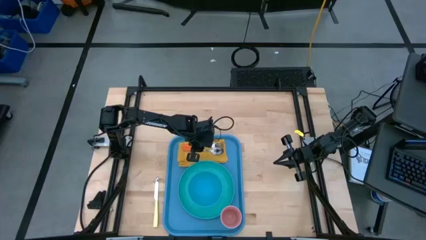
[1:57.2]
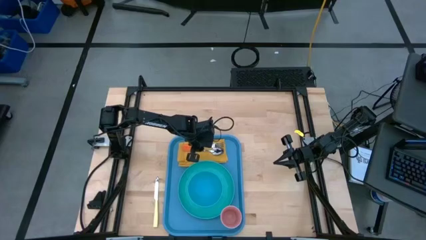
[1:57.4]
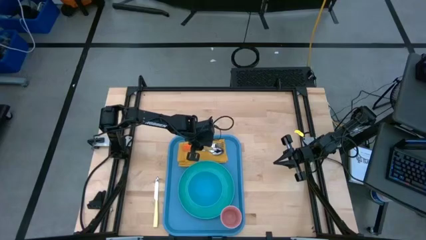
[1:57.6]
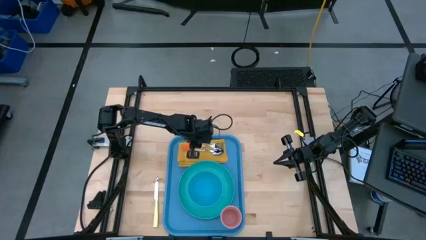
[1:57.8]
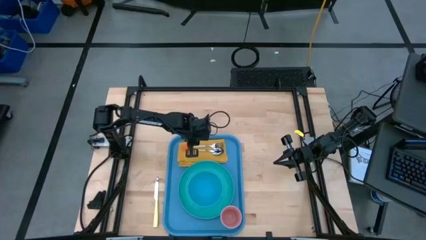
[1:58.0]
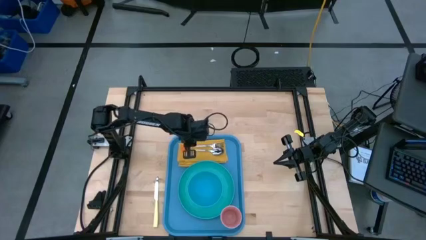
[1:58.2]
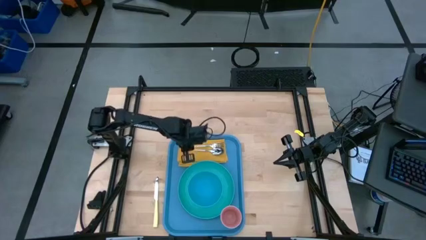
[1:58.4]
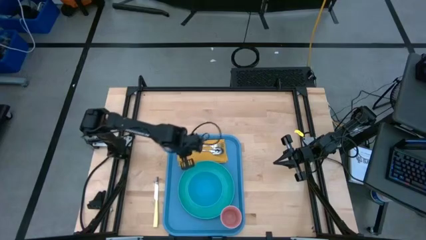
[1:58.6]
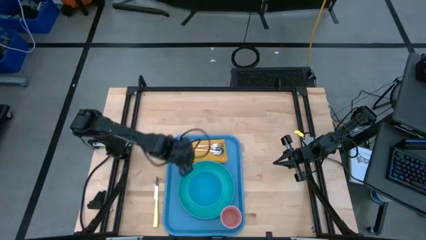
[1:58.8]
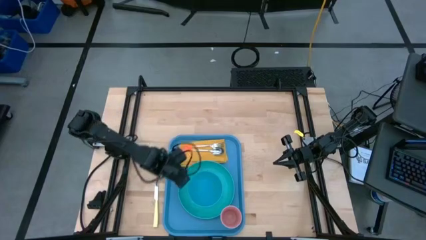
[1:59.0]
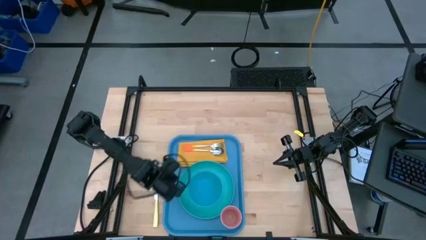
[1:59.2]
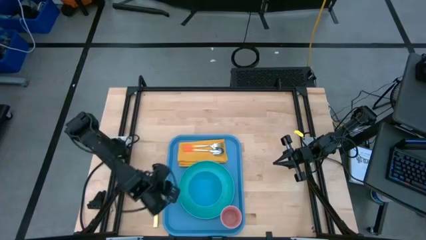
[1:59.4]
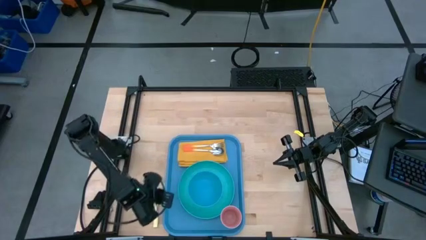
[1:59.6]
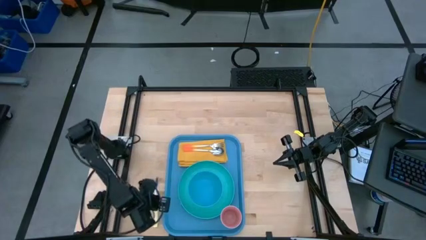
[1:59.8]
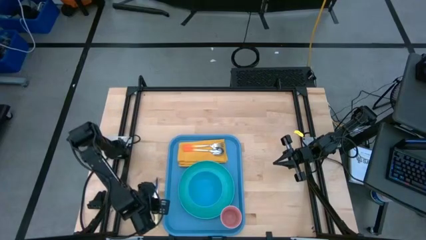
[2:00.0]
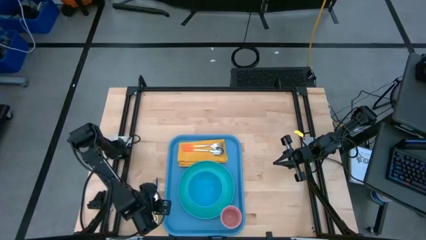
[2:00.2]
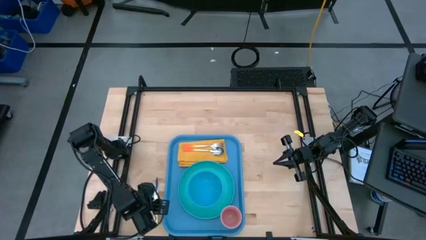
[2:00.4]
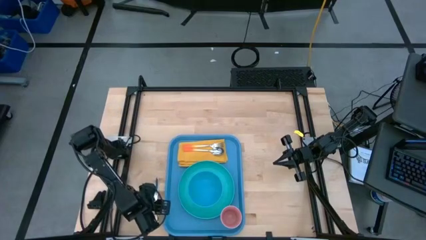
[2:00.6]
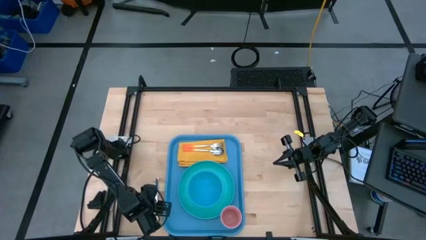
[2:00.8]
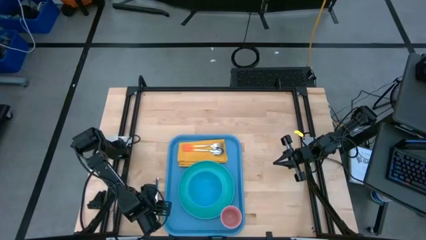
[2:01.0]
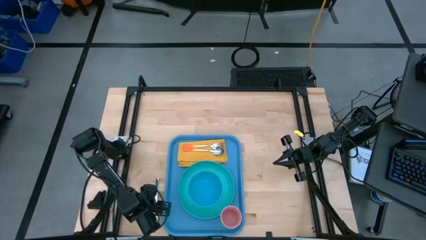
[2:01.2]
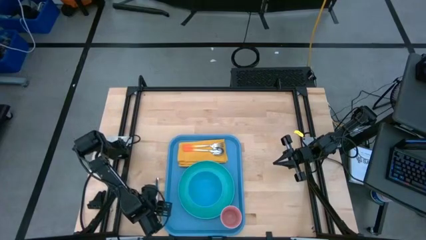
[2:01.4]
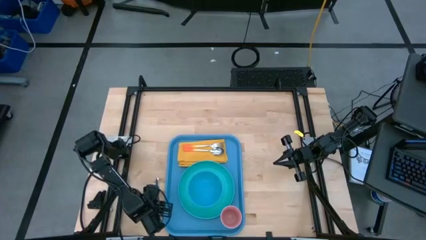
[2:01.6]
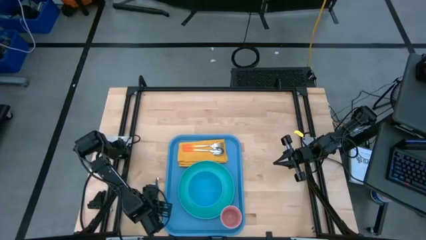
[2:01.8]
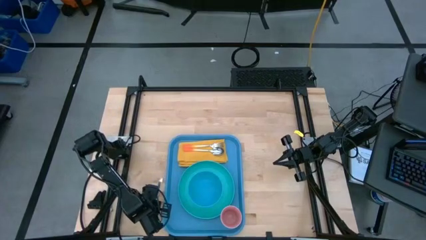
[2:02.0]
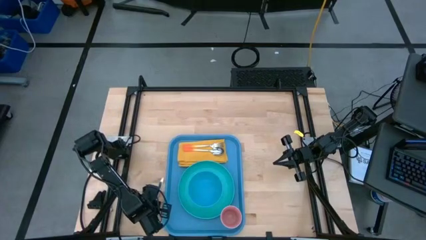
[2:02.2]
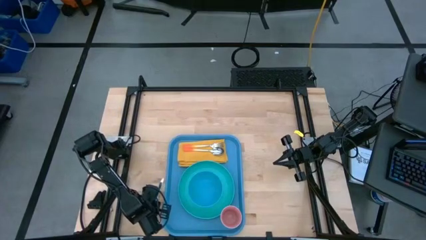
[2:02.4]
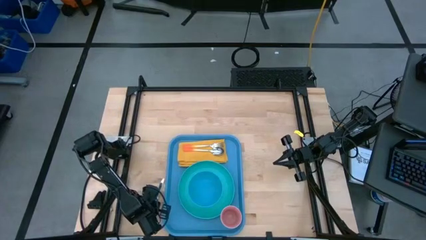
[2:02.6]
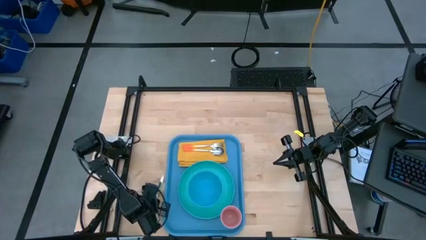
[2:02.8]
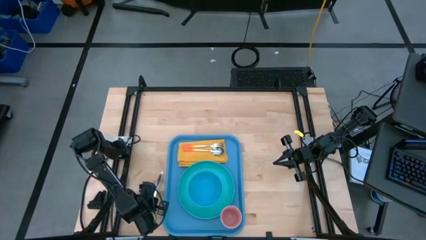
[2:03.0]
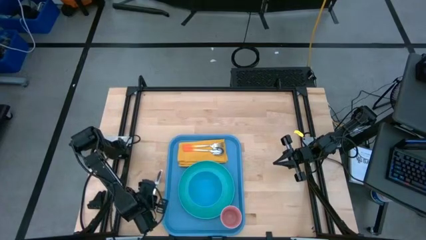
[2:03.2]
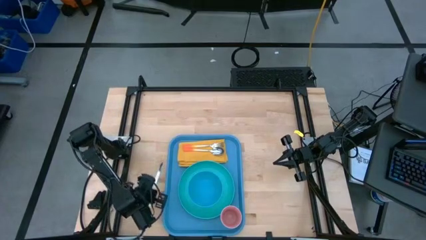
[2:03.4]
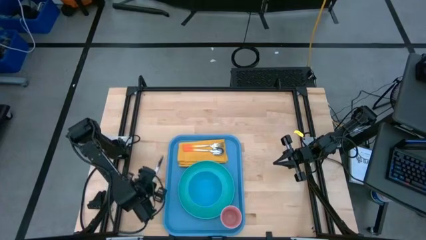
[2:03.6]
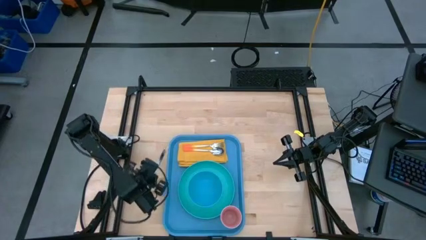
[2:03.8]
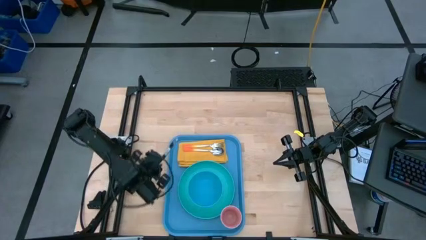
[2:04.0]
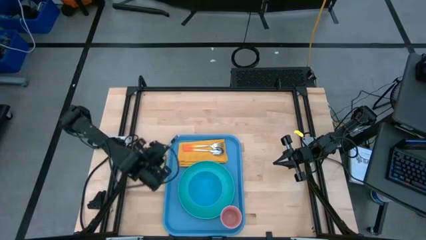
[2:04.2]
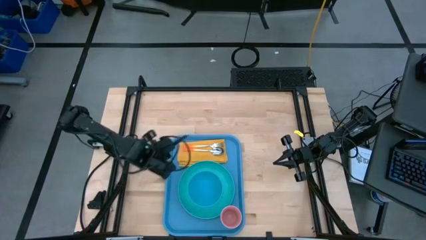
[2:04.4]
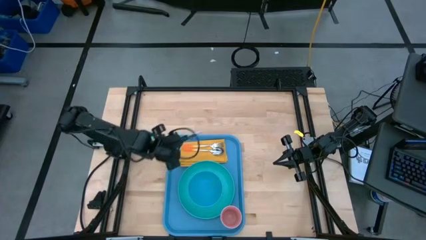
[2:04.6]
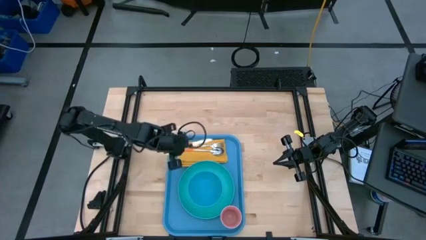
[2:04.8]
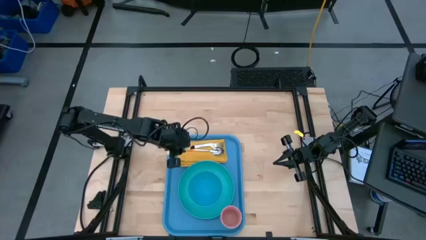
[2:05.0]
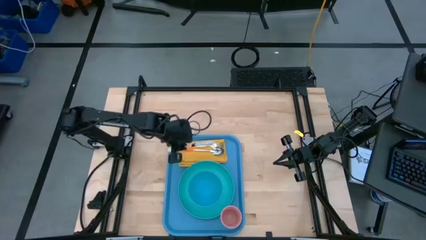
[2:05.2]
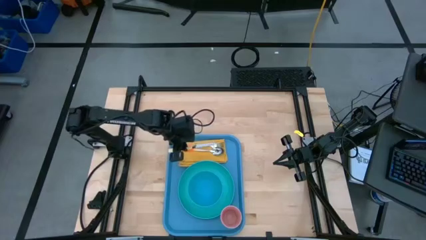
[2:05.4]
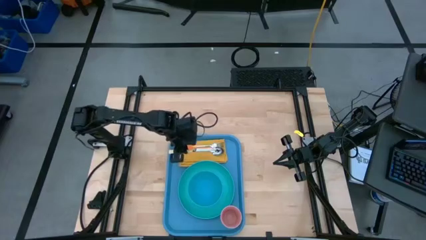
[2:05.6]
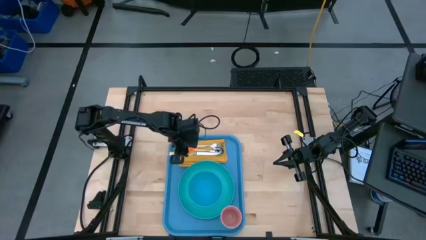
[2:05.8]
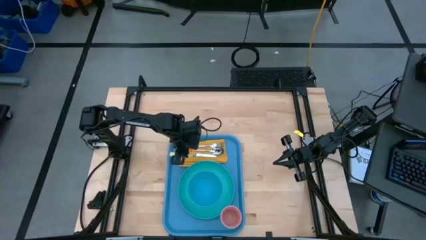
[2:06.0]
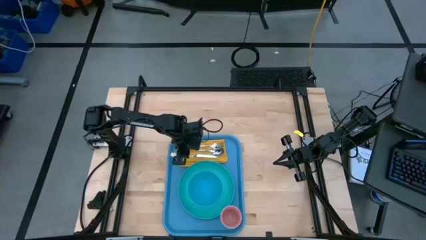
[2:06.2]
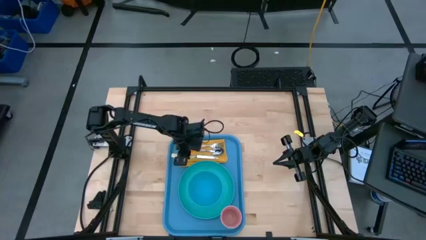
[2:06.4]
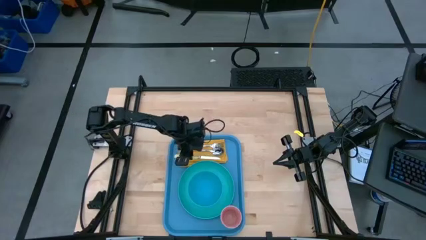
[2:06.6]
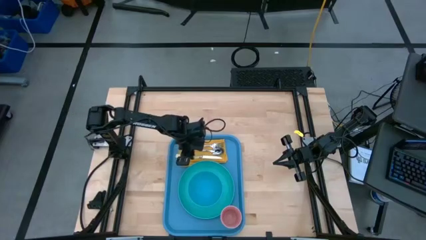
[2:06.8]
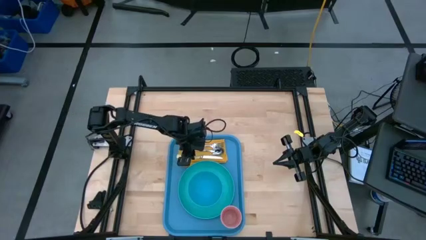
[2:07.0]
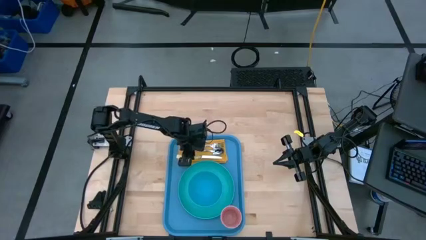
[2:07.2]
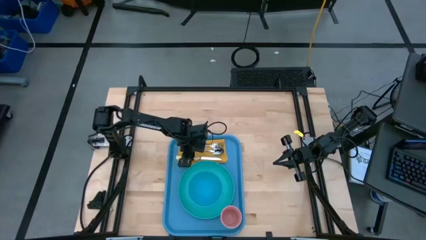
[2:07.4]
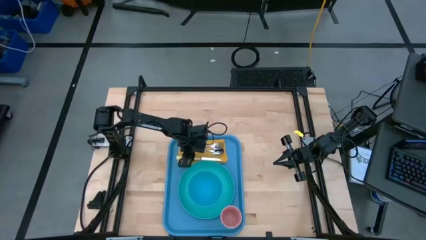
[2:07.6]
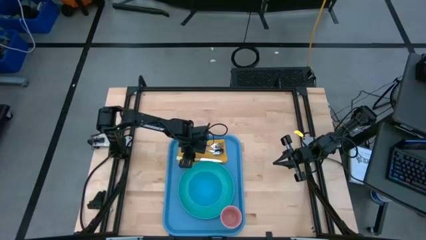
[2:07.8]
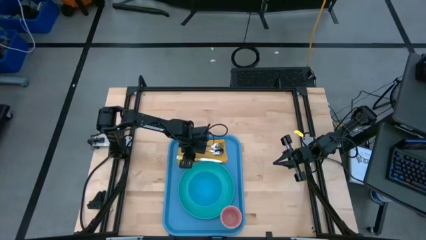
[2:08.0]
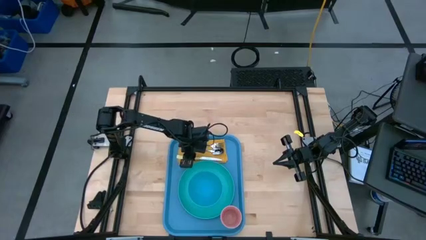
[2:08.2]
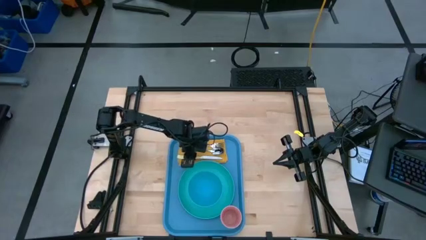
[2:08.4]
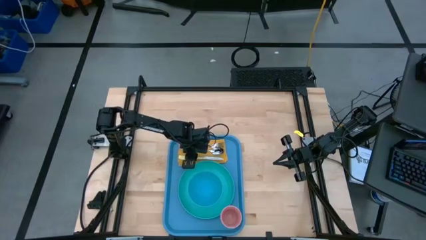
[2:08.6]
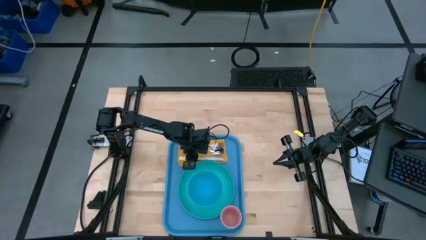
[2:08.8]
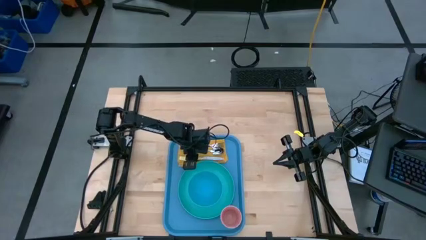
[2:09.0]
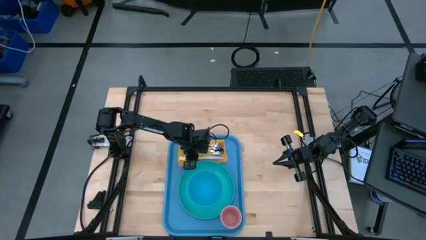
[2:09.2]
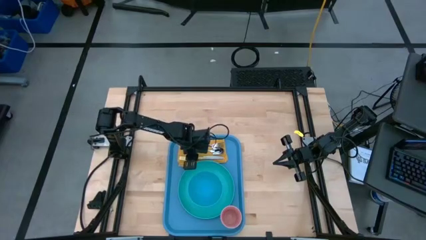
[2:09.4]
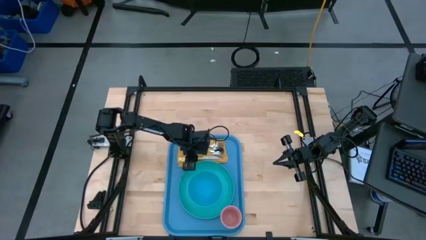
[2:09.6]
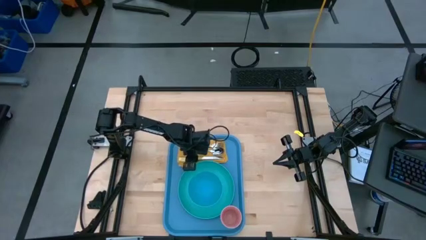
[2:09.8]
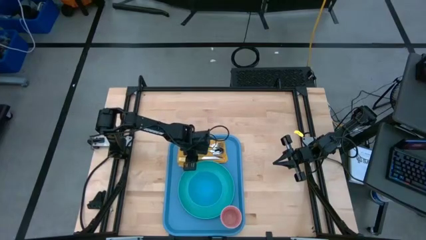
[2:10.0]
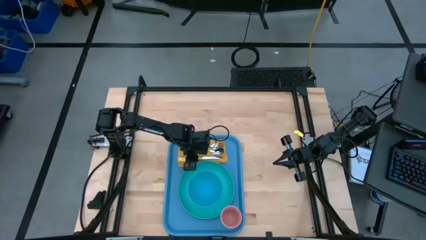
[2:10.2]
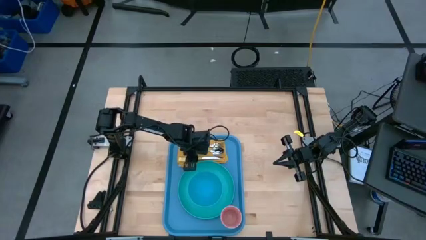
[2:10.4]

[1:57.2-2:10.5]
Task: Set up tray
Put the yellow knife to the left of the blue plate on the yellow napkin on the blue serving tray

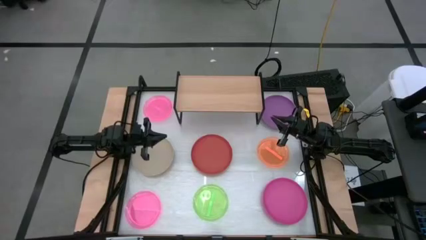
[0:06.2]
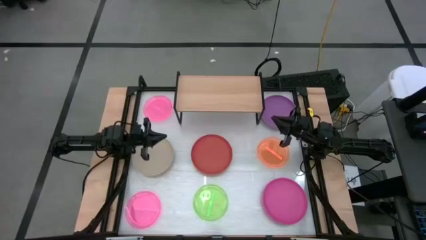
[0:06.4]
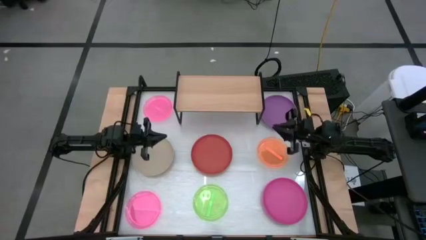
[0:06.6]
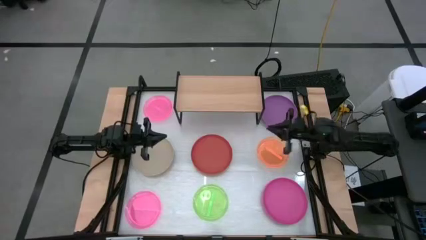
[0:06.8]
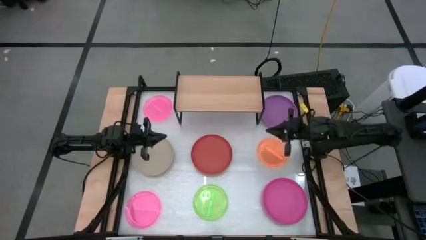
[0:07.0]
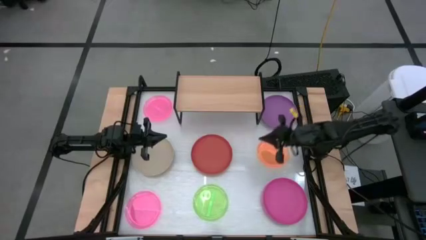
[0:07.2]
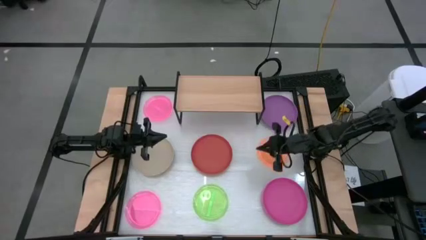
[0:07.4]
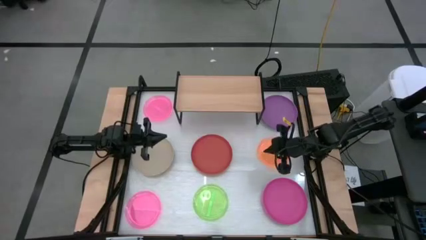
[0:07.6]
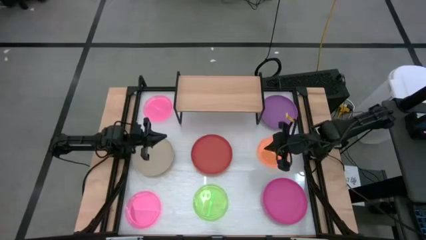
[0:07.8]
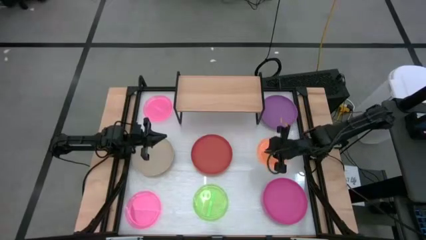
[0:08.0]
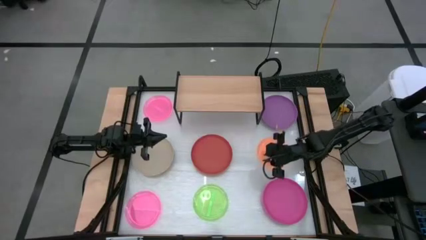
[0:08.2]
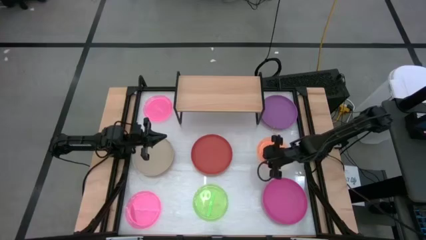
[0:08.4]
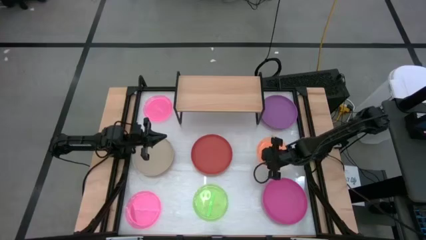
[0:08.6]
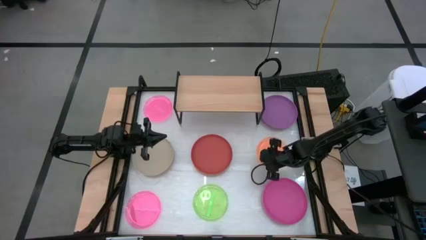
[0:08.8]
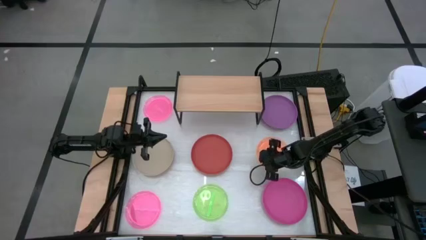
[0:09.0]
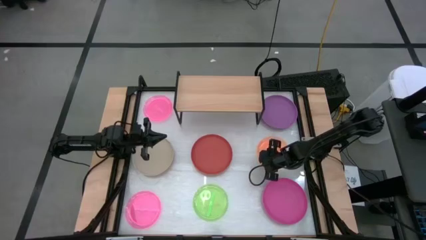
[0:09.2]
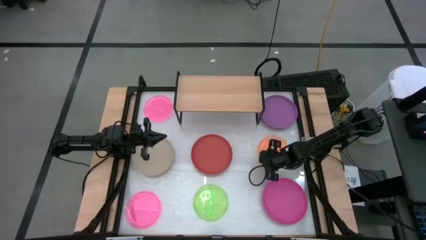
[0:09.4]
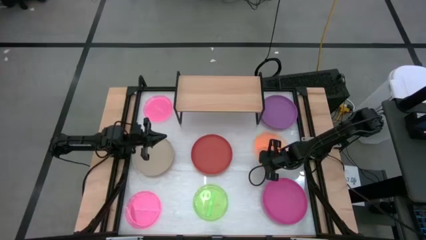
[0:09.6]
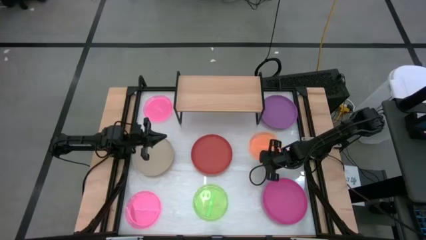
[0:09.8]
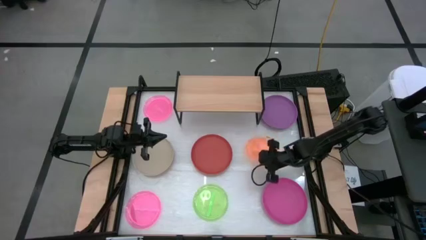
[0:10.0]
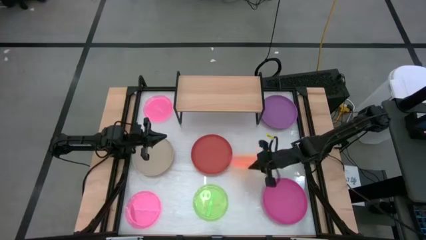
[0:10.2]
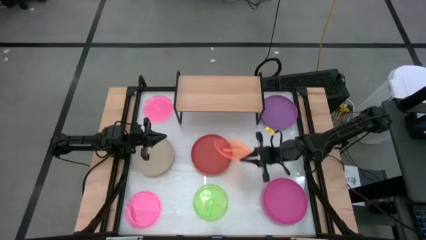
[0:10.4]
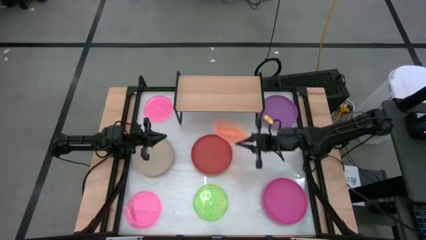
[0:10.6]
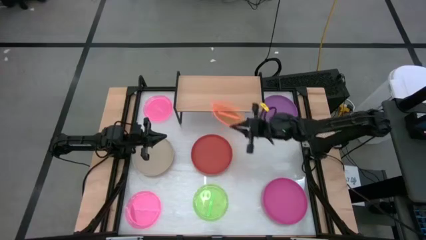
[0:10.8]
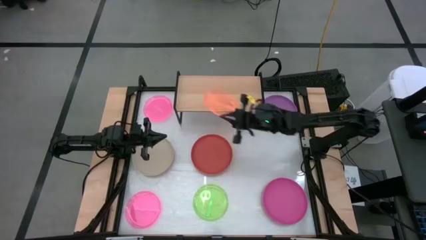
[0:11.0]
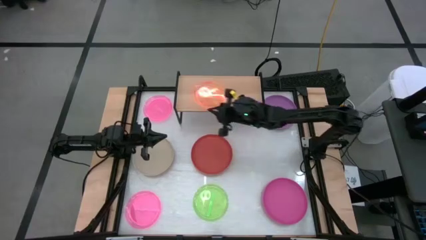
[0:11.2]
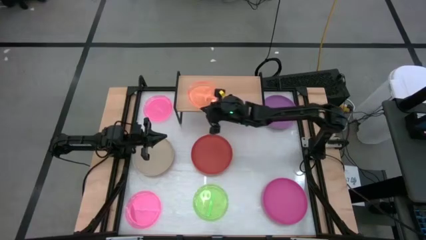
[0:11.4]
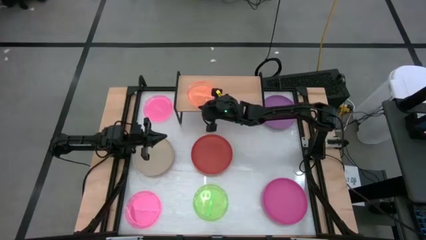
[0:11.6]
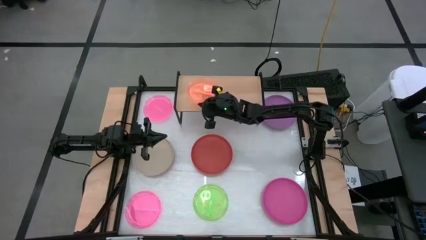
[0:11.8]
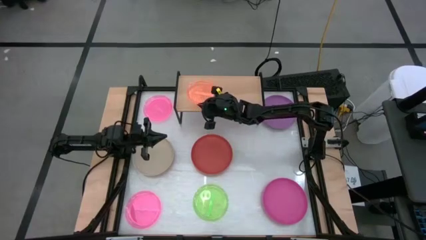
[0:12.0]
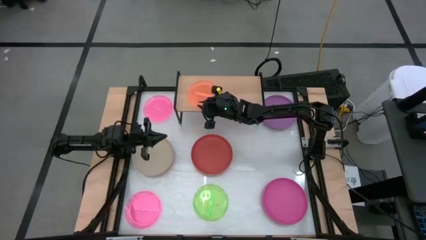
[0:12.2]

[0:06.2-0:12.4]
Task: Place and stack plates onto a shelf
Put the small orange plate on the shelf
